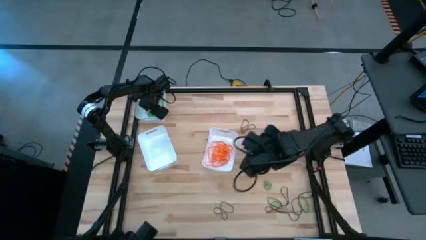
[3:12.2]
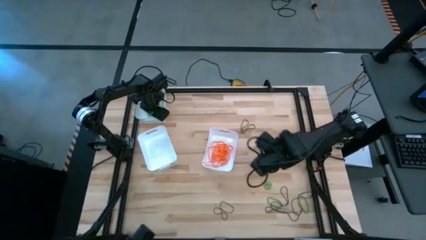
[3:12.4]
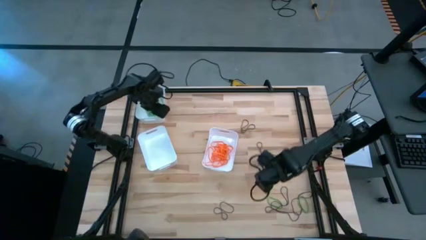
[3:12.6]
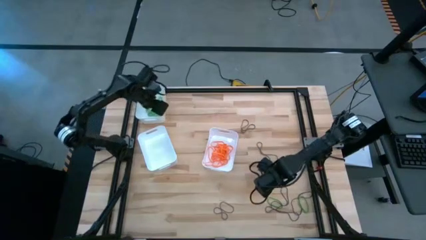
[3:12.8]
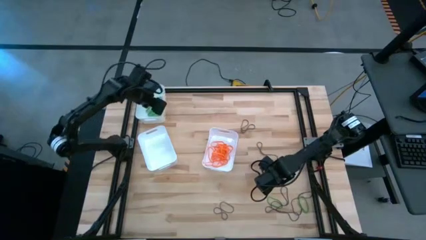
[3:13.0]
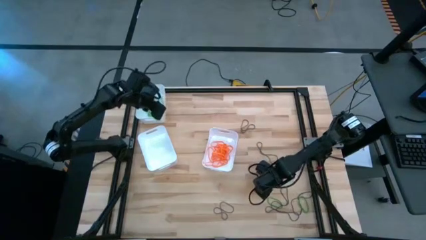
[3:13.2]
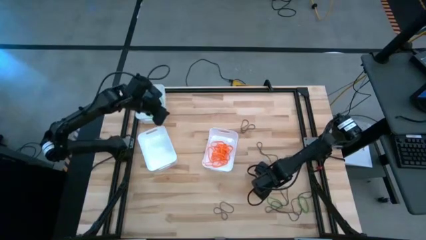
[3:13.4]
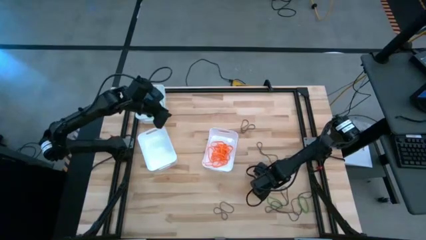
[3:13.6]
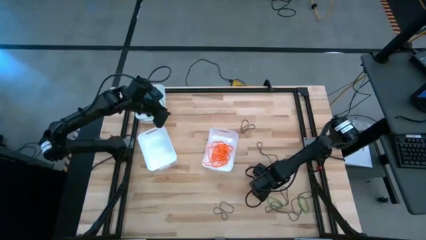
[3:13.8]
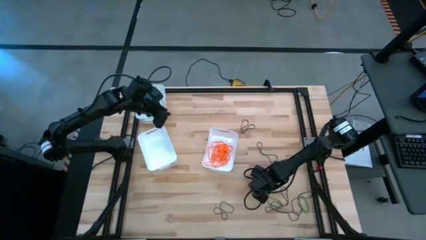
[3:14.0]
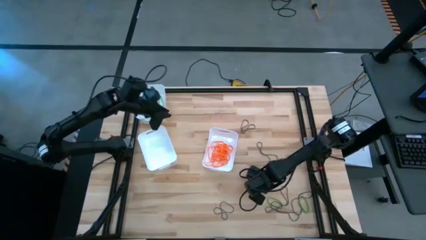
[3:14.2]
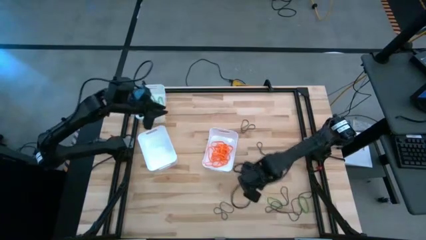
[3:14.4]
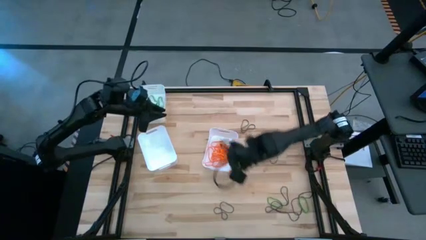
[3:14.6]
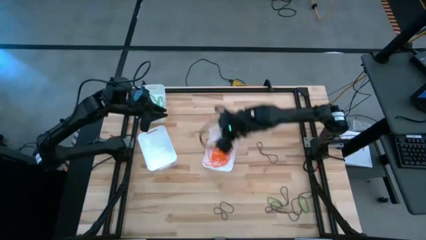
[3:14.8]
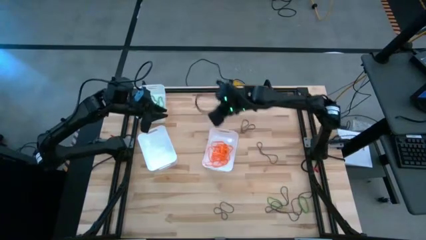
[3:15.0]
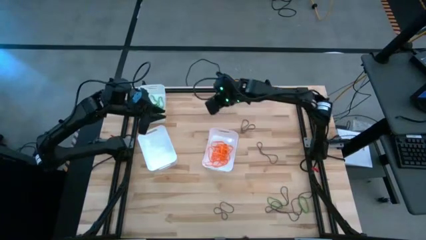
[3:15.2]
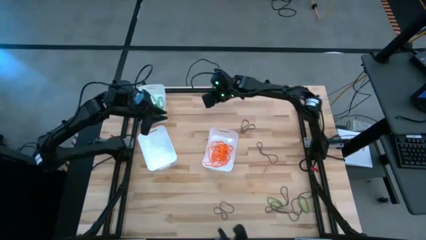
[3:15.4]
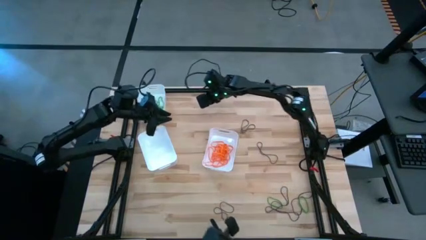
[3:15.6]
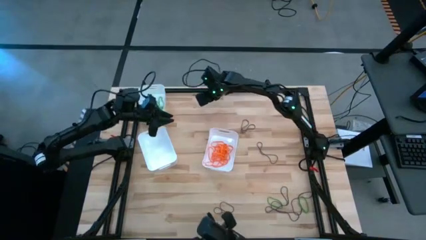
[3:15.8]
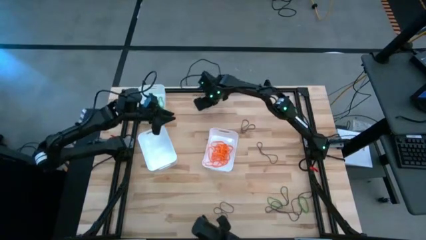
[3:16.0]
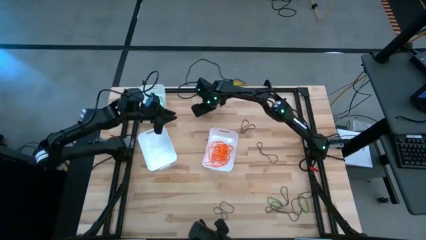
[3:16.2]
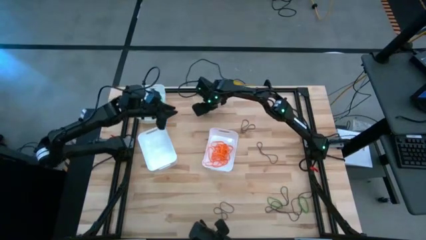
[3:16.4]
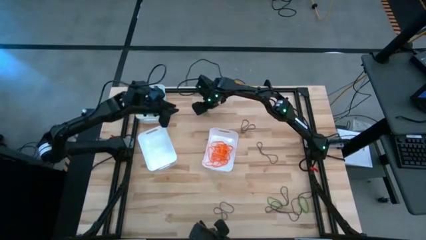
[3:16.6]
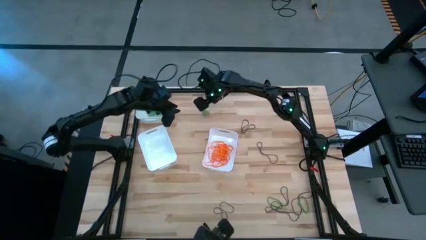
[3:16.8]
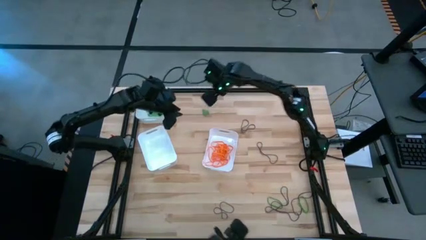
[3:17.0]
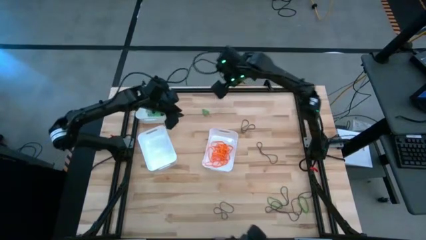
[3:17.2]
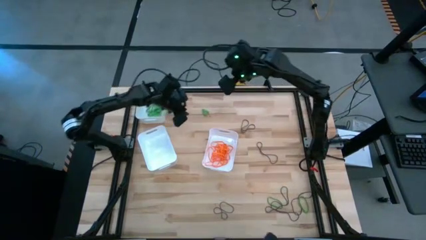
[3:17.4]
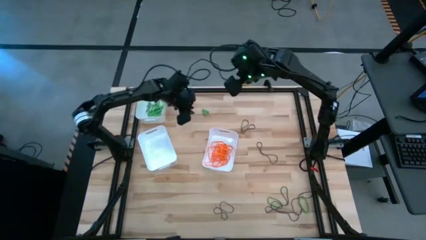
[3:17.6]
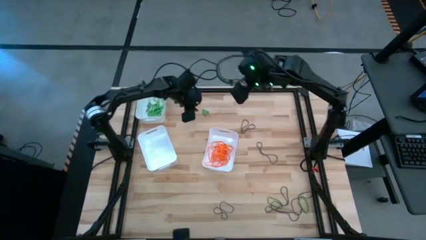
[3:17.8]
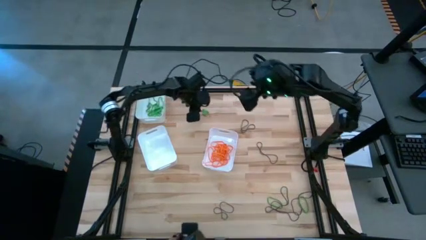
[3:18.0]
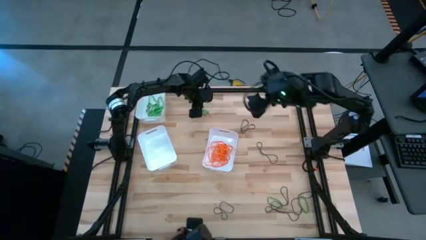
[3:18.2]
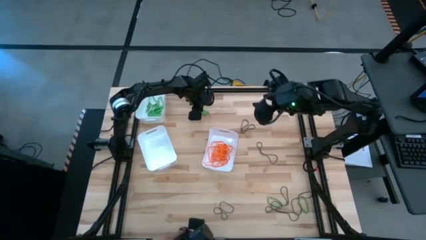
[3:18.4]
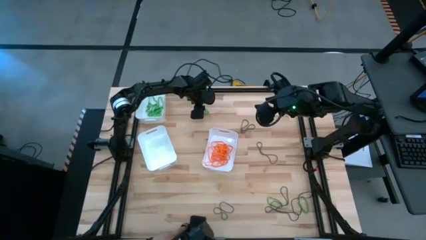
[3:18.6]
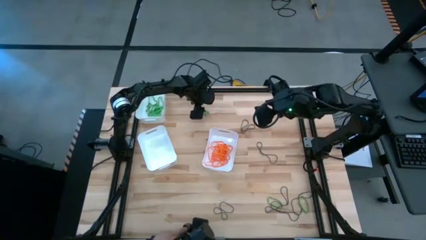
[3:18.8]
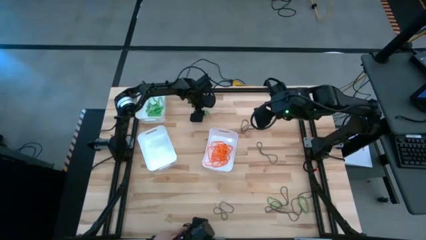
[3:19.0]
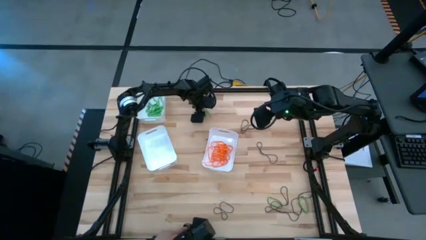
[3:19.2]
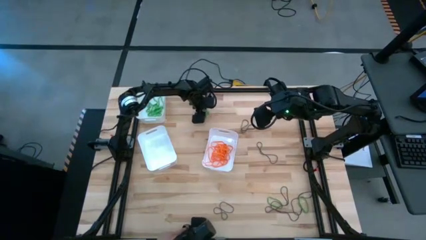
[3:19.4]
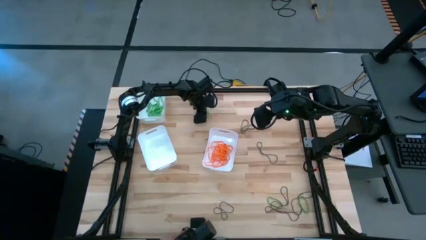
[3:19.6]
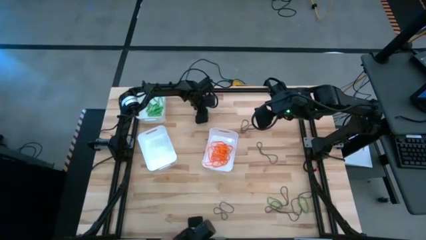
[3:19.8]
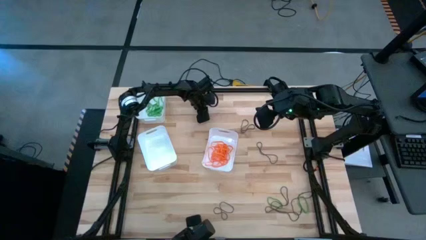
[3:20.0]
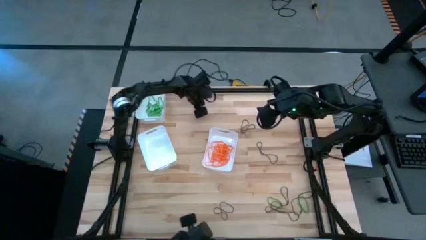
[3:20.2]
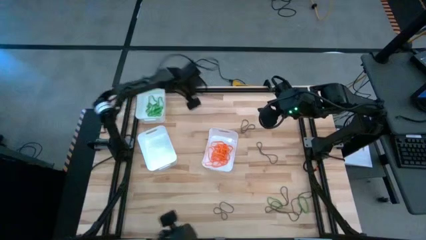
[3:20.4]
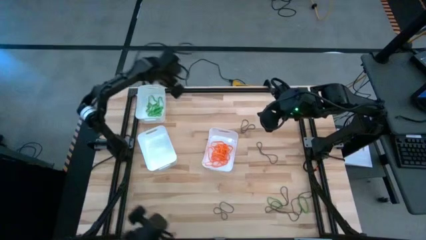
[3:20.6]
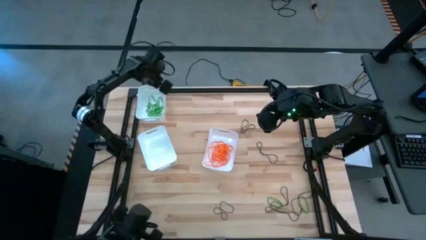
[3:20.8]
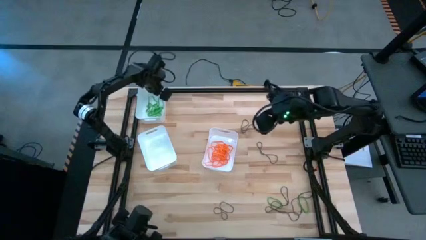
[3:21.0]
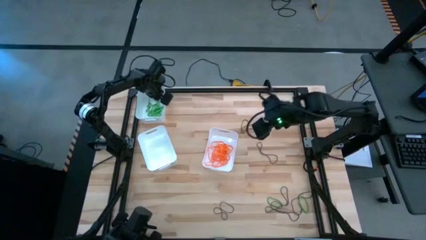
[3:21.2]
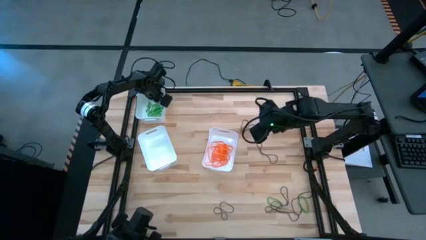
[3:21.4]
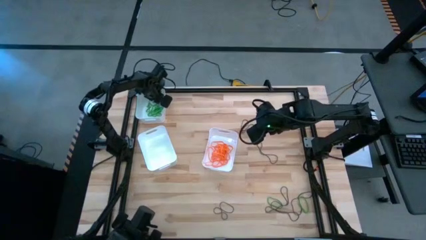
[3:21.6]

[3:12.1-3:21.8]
Task: Sort rubber bands into baskets
Put the green rubber band into the top white bin

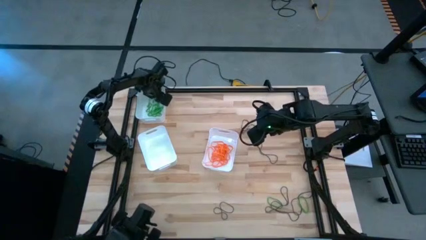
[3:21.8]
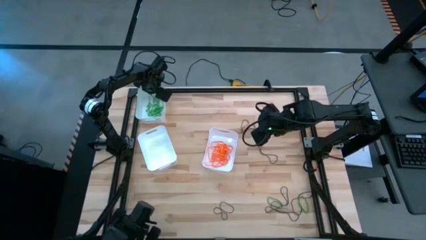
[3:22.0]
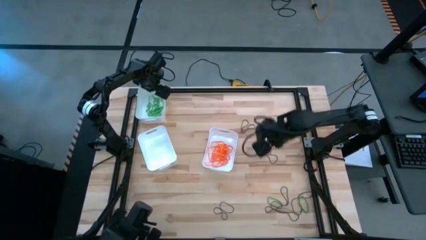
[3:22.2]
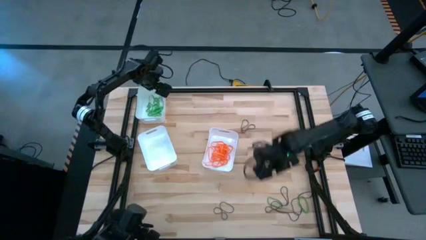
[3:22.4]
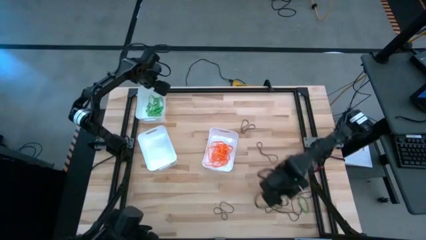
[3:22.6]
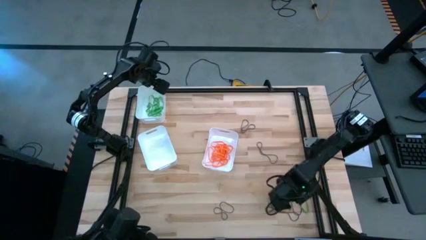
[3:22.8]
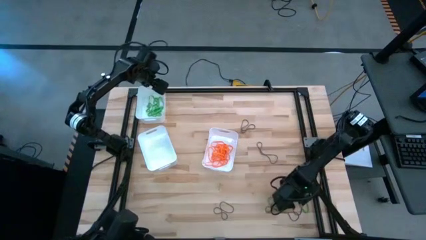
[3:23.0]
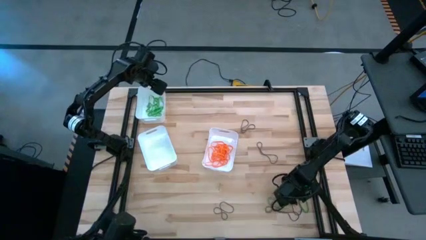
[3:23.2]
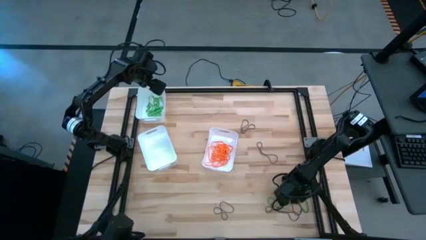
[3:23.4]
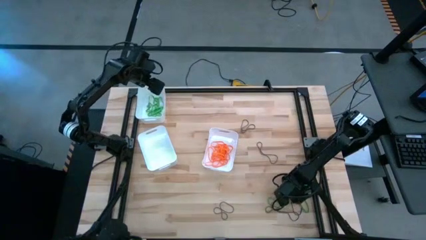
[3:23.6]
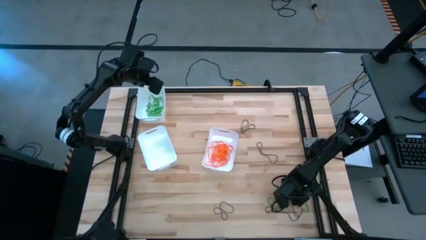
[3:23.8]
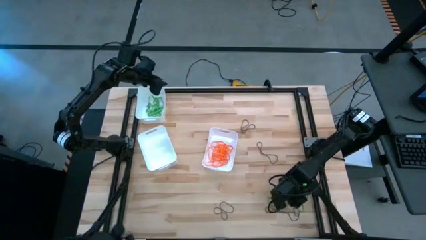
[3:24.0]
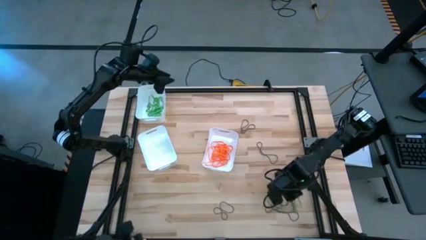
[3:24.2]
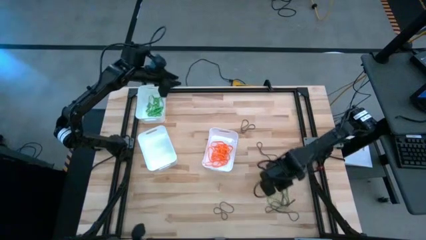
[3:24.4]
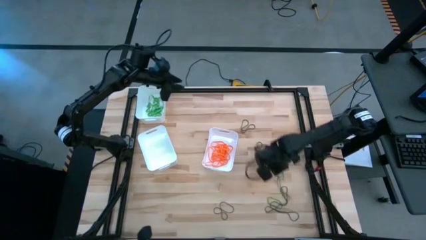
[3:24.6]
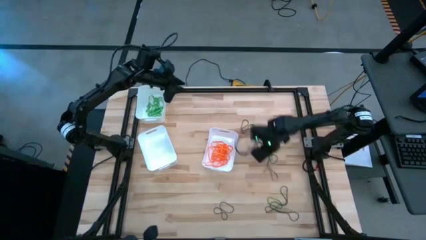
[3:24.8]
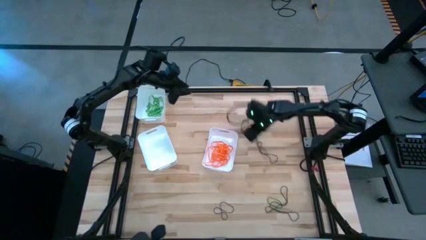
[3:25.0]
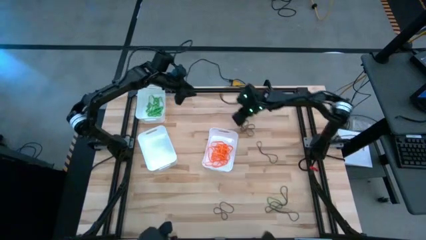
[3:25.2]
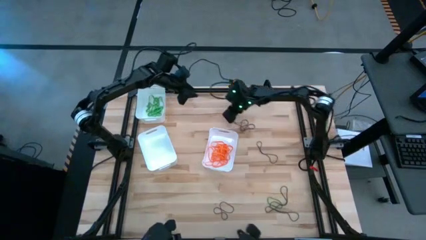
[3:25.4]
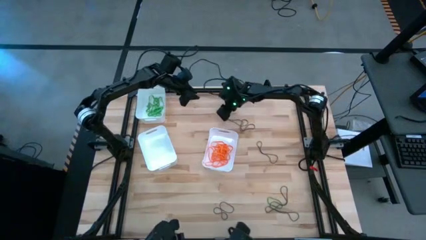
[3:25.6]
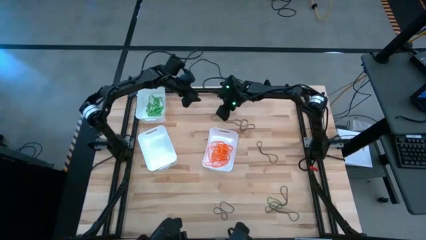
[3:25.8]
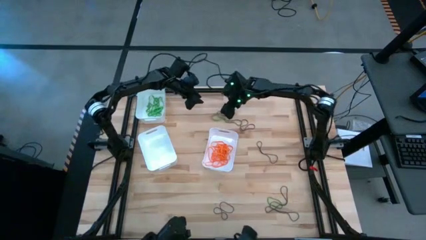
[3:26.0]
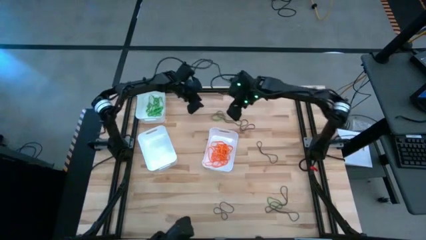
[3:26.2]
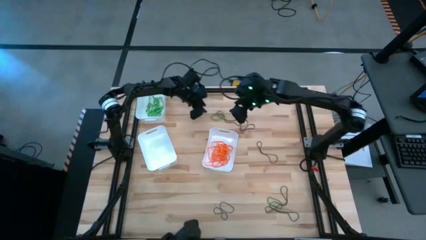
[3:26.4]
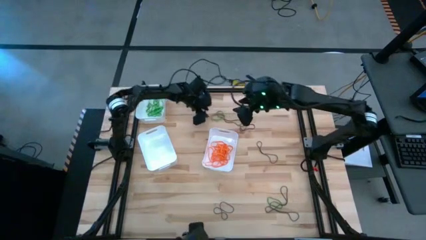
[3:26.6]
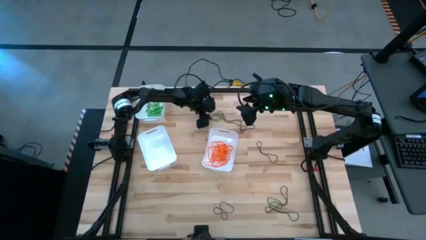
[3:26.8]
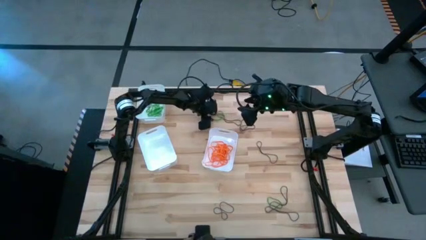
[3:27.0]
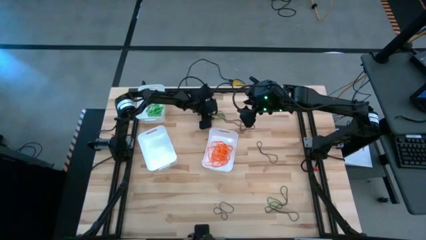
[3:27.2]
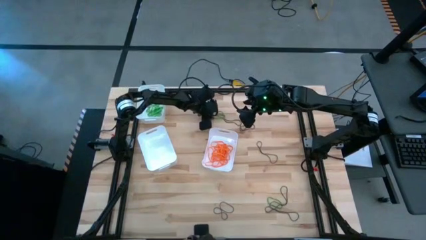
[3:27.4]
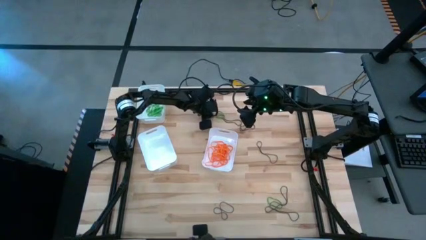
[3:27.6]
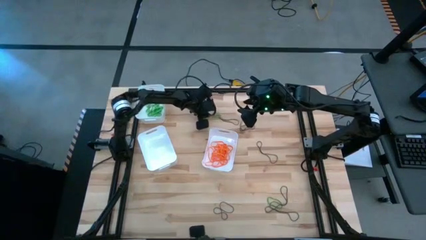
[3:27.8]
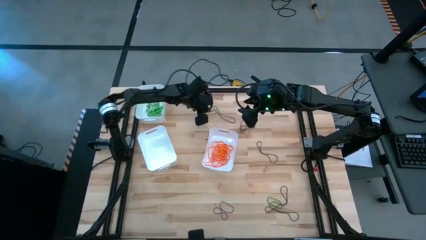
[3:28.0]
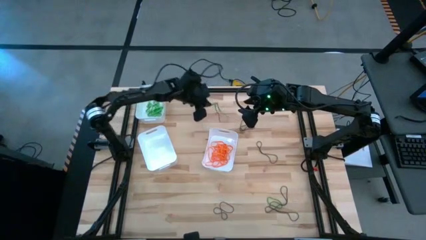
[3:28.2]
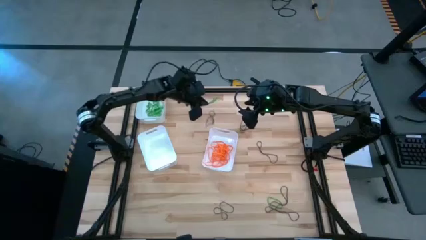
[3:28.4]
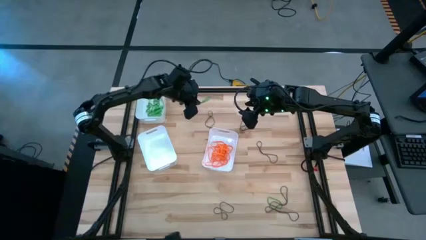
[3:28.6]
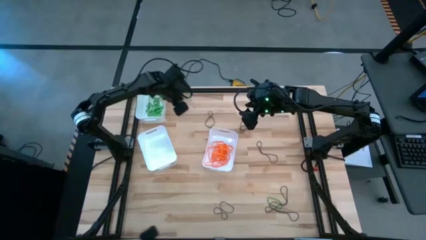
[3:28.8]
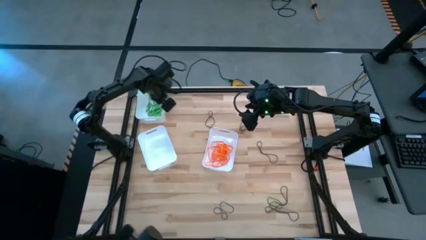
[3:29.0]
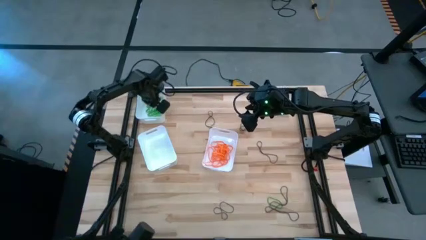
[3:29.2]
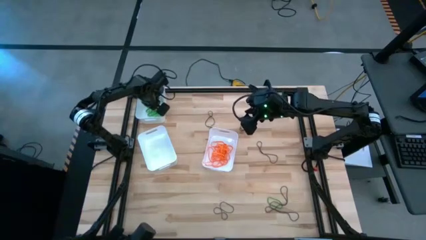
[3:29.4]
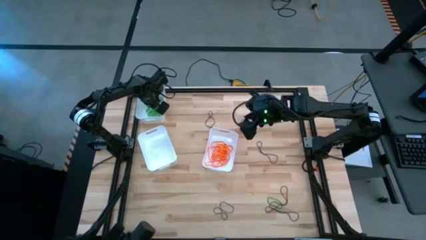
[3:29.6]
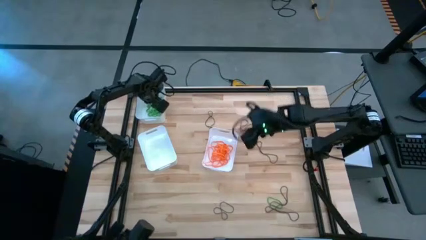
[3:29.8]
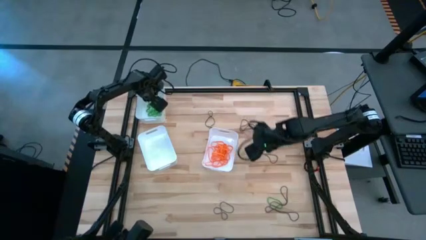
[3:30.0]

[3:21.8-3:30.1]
Put the green rubber band into the top white bin
